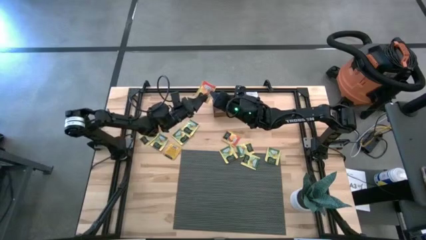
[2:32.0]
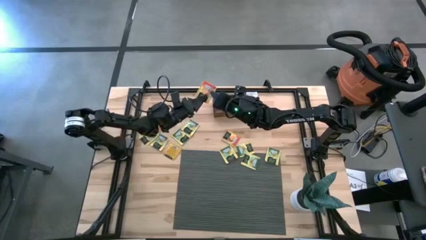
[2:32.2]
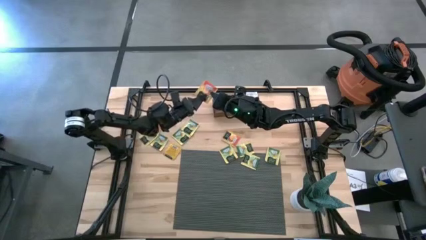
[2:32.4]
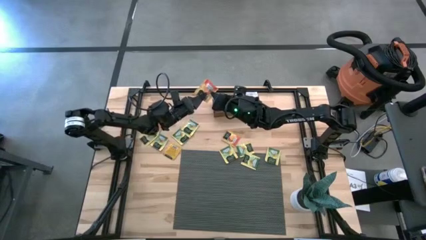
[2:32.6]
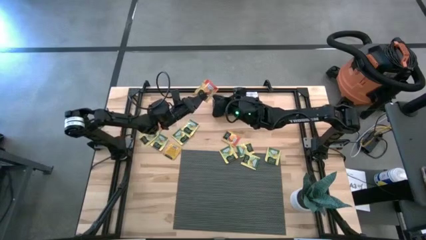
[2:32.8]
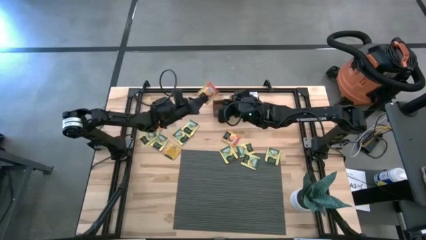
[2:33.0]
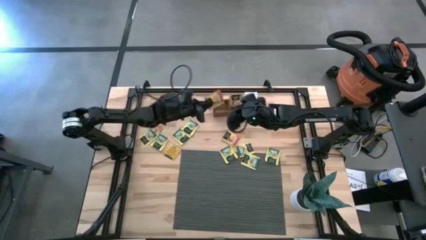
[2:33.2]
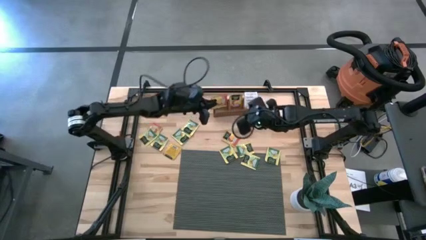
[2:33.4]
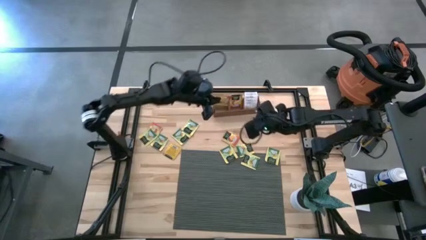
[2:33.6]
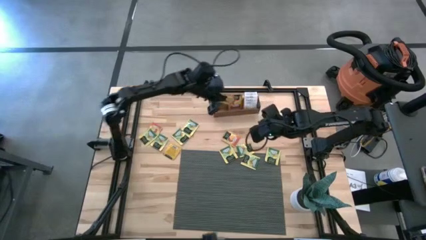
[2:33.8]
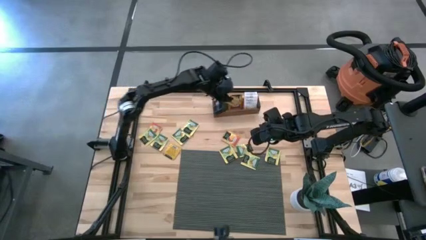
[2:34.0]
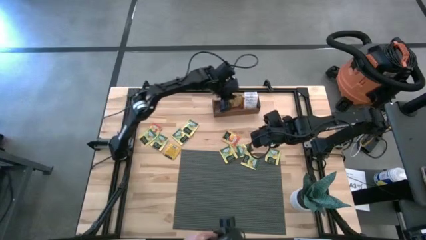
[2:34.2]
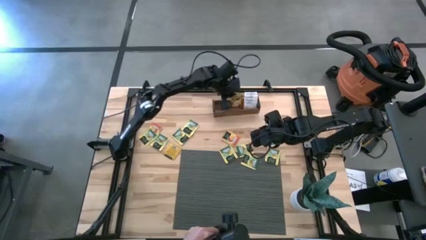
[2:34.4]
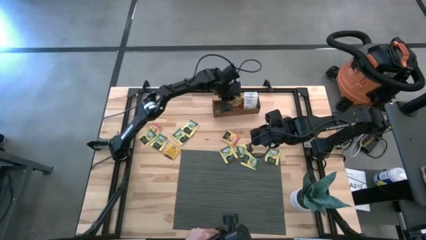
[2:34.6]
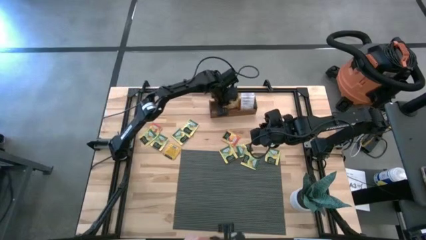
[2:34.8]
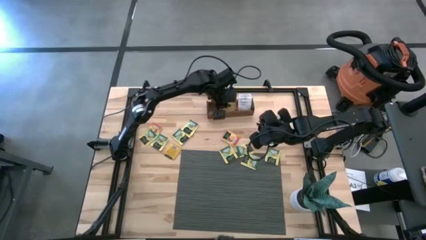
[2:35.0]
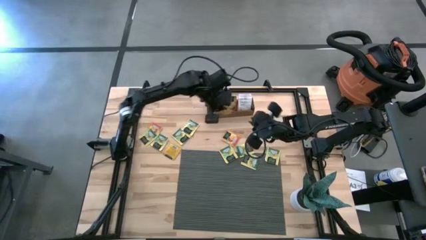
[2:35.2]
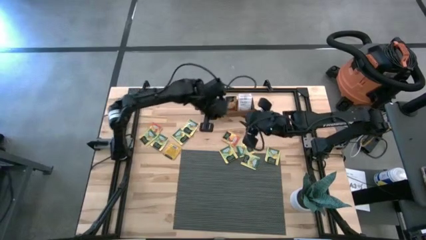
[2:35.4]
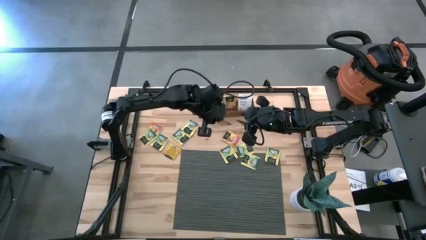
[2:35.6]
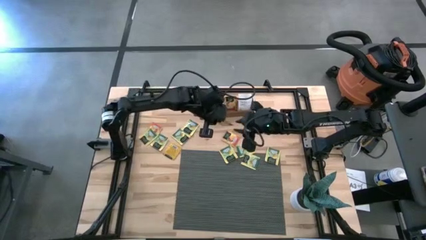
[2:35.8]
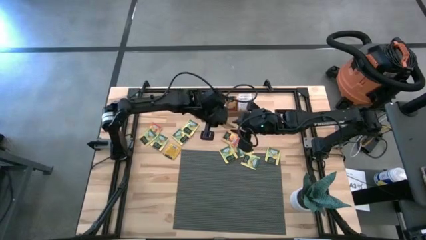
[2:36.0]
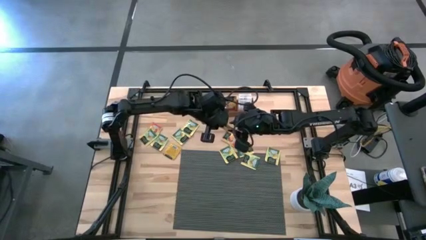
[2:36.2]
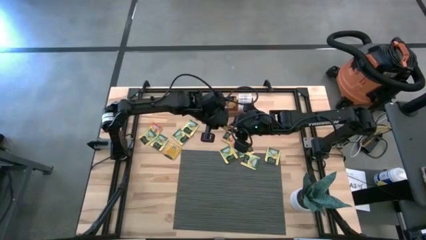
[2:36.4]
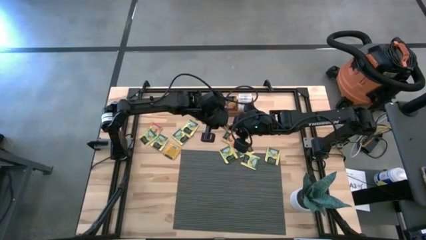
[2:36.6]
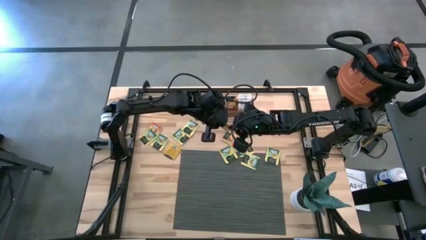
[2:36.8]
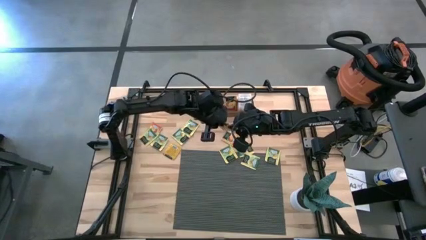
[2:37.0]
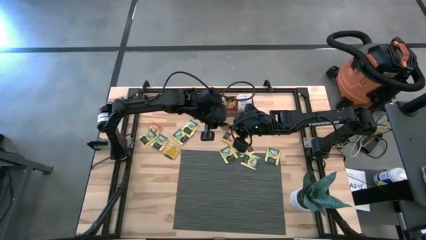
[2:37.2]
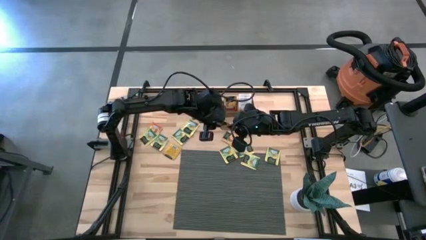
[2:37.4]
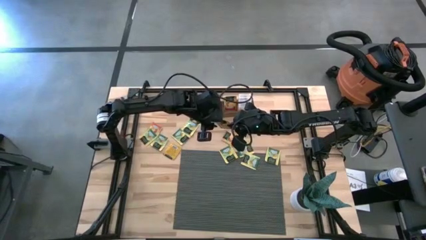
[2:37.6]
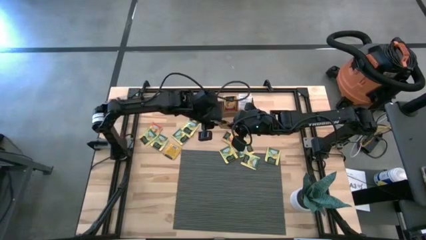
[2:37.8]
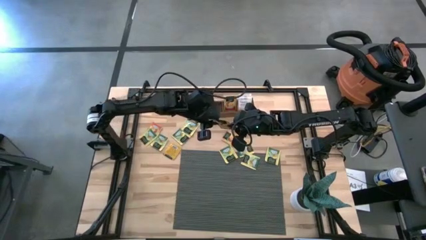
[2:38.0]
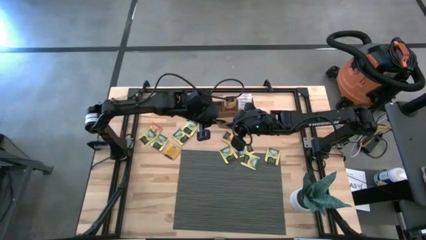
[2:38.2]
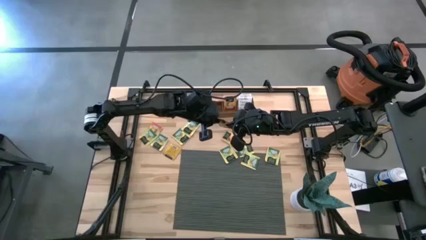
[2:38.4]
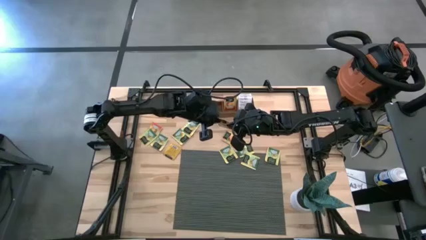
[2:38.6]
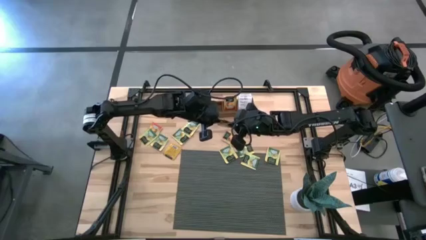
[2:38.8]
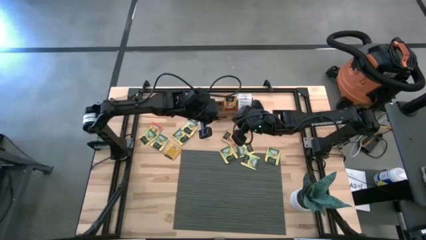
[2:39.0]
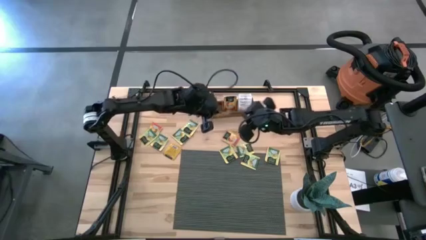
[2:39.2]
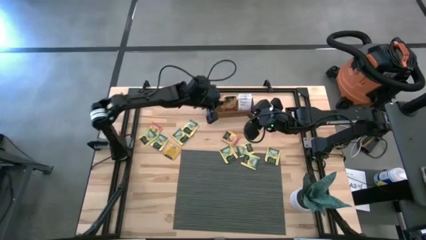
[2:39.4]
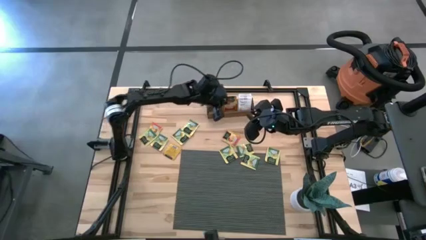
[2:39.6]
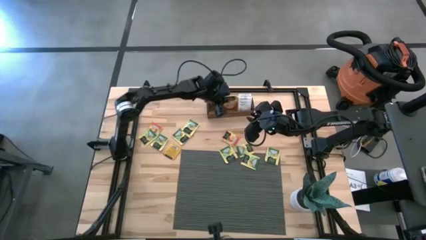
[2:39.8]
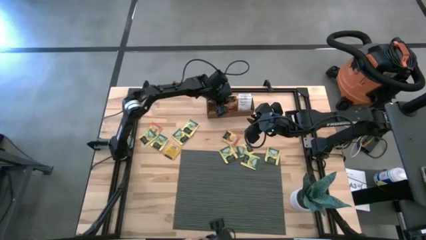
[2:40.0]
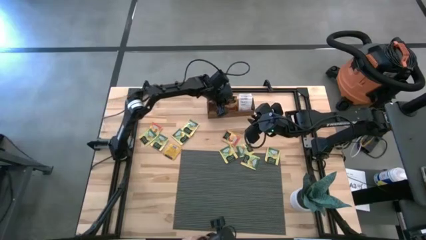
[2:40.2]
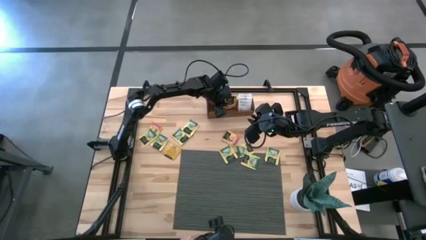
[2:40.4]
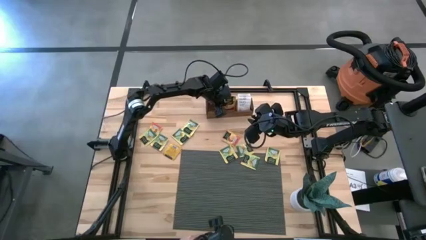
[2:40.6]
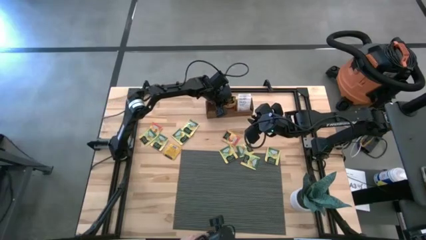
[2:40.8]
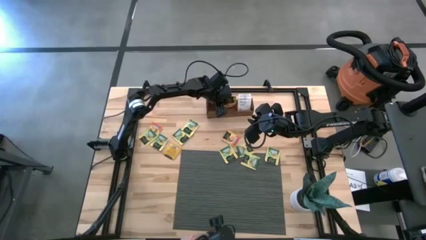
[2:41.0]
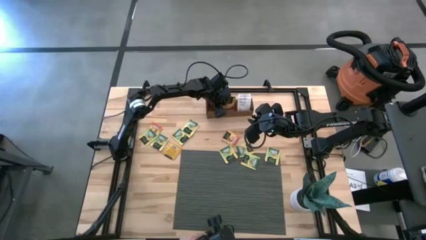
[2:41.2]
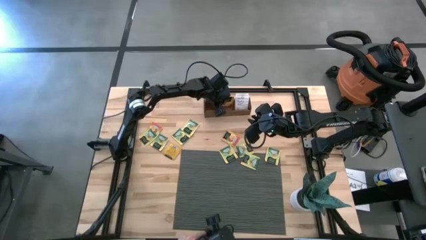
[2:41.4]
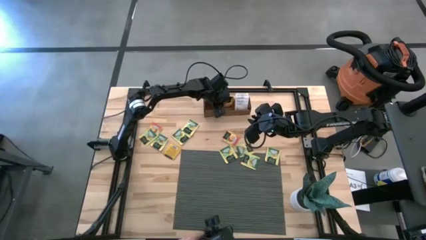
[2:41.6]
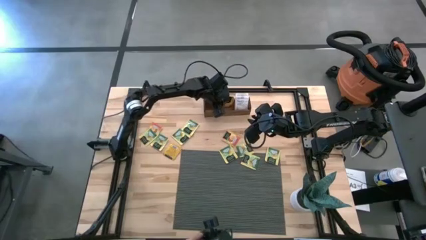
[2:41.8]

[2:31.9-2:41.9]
Task: Pick & Place Tea
Put the orange tea bag into the middle section of the wooden organizer

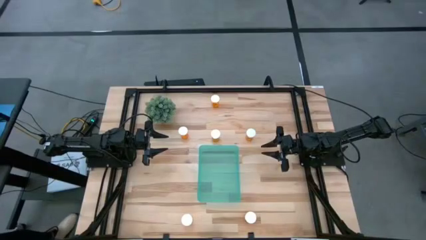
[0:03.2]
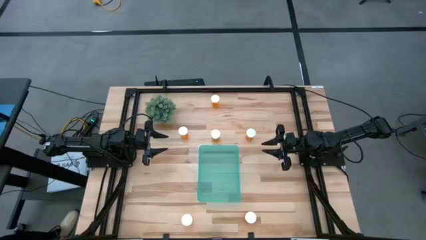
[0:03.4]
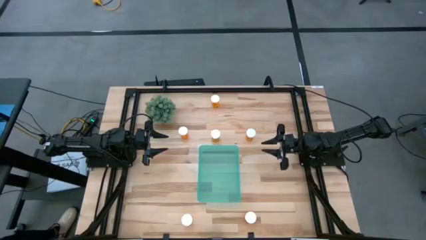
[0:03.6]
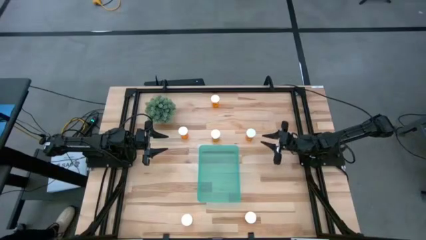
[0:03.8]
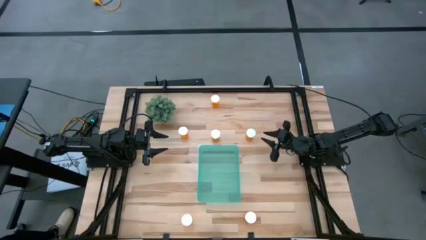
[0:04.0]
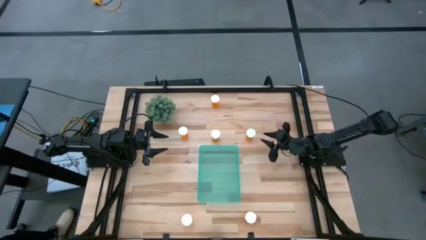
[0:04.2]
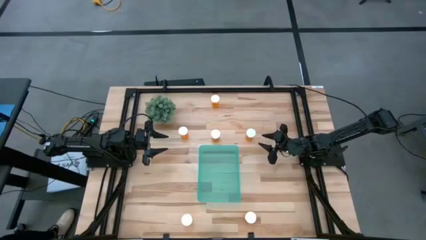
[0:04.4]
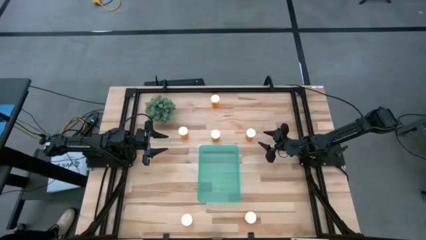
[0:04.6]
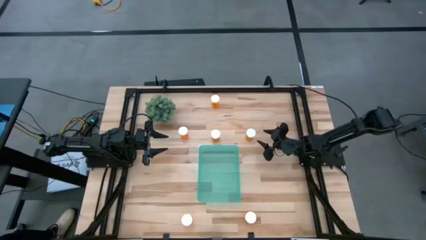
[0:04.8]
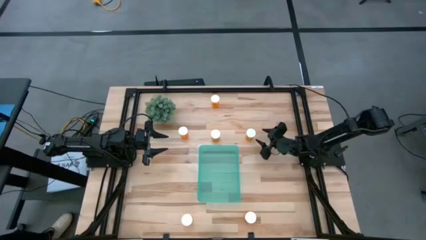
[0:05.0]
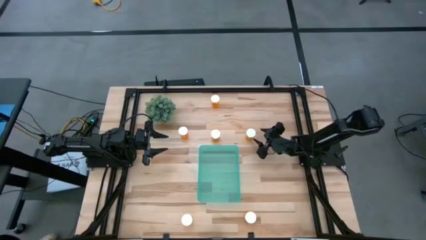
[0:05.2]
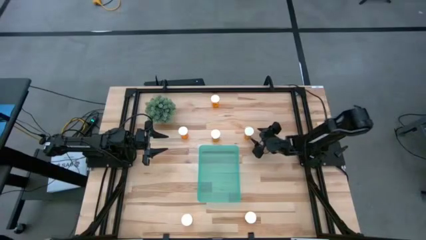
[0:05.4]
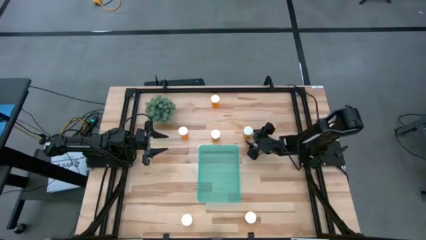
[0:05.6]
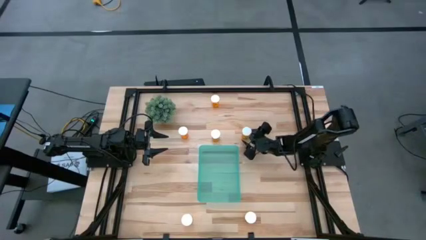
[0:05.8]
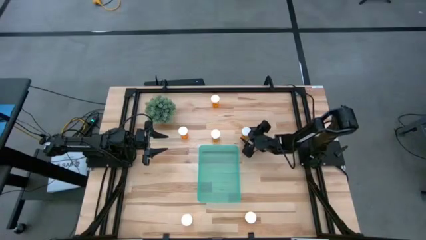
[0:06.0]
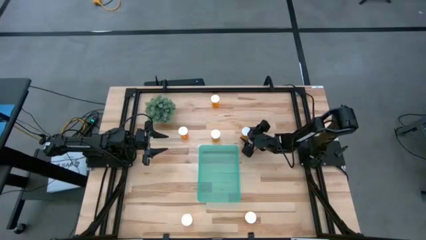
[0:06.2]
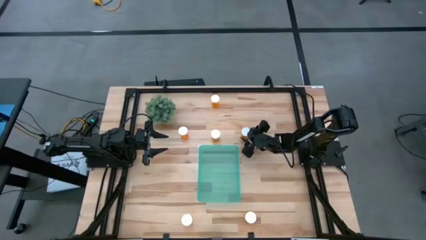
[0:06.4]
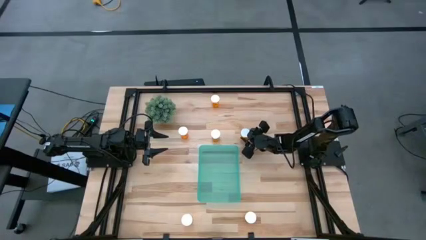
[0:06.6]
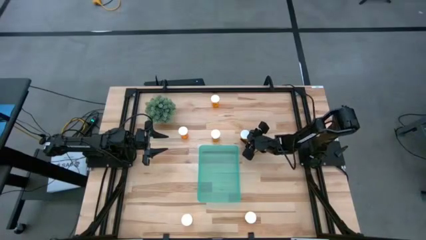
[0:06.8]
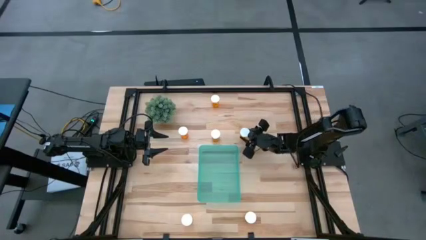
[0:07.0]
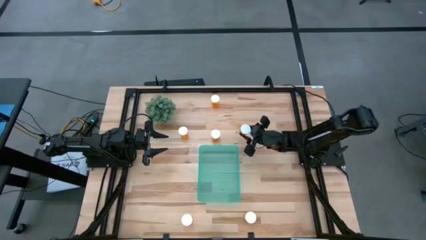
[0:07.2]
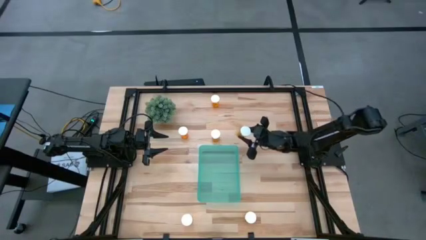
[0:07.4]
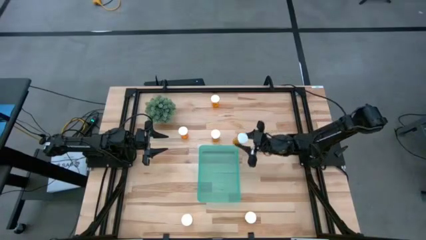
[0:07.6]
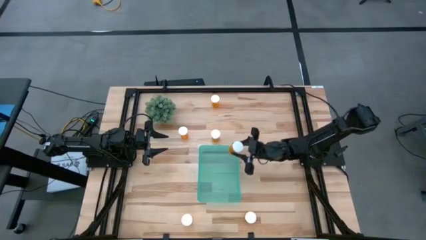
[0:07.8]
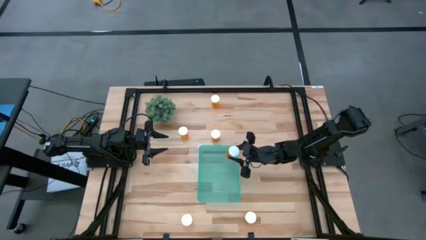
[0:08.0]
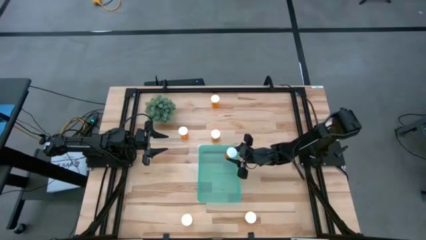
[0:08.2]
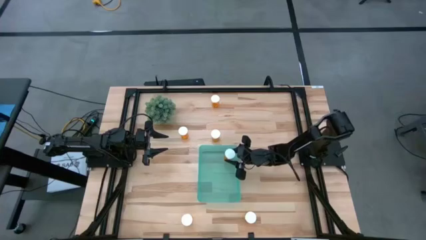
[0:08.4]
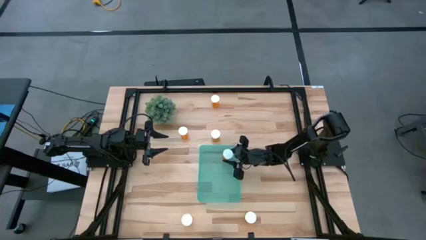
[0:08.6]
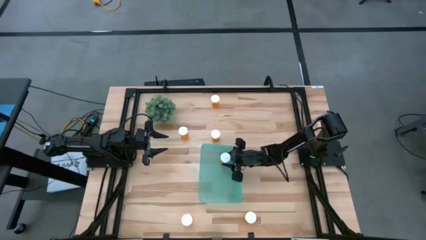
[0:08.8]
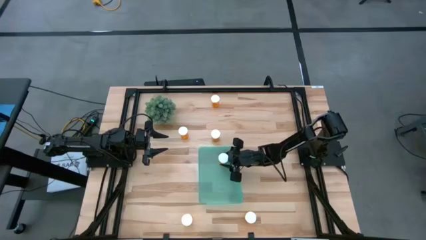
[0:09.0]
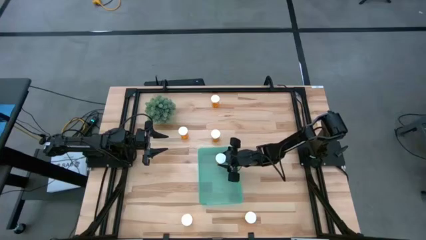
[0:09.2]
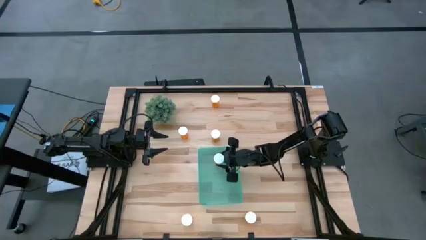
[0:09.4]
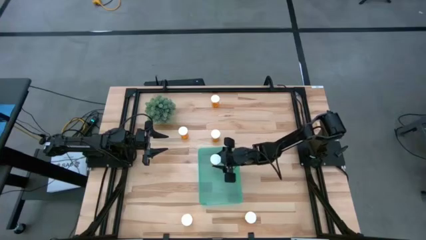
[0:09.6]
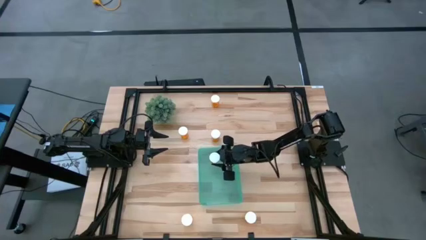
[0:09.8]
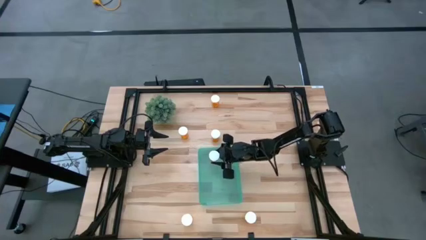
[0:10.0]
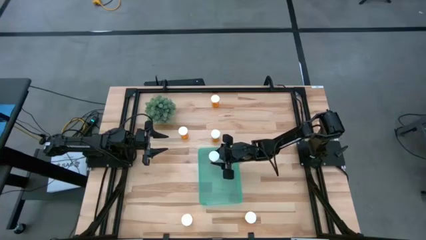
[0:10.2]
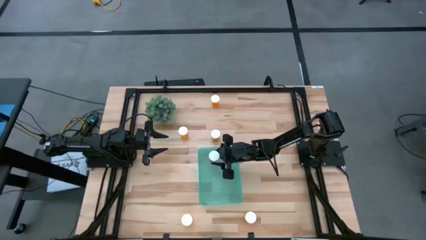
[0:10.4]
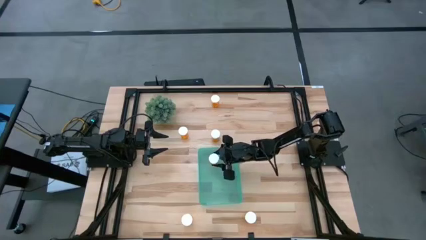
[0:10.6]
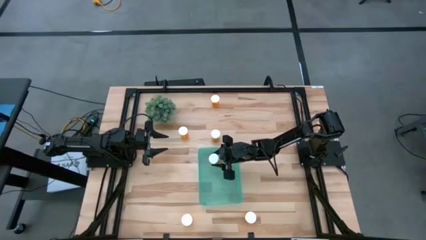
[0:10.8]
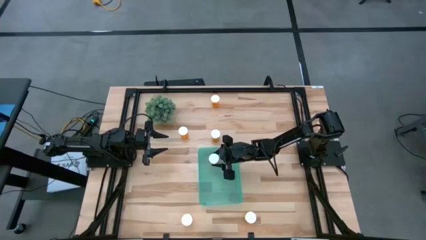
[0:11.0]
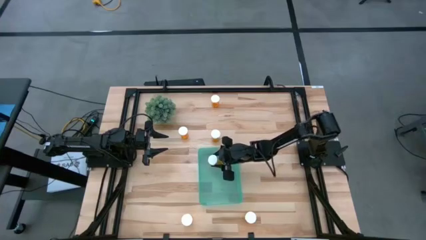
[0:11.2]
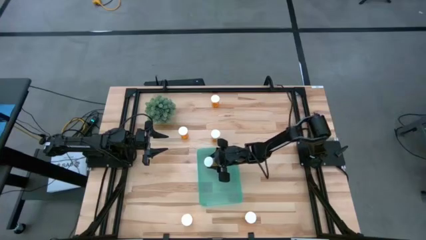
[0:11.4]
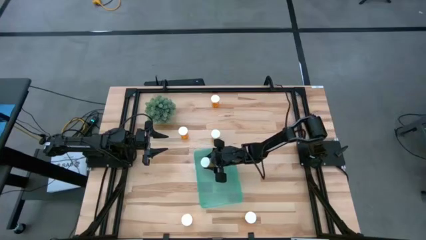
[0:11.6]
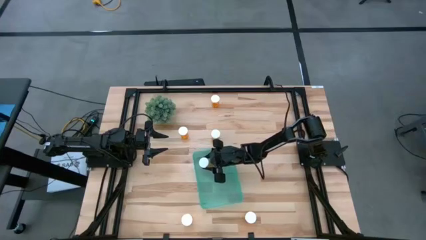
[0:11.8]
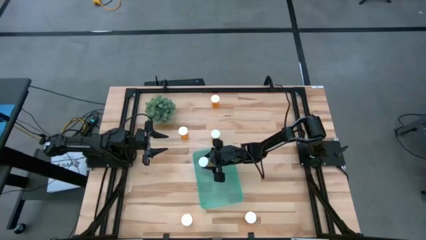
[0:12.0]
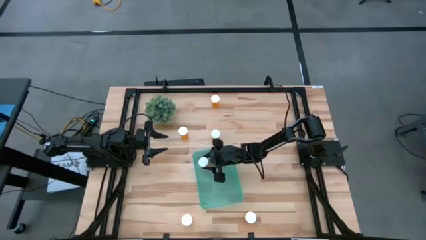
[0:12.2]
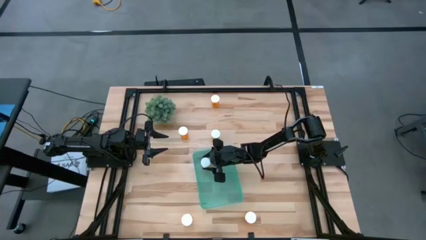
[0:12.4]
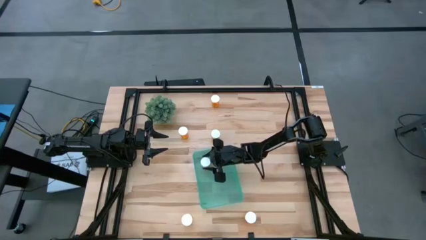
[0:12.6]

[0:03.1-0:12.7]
Task: Pick and place pill bottles into a basket
Put the orange pill bottle into the green bin
